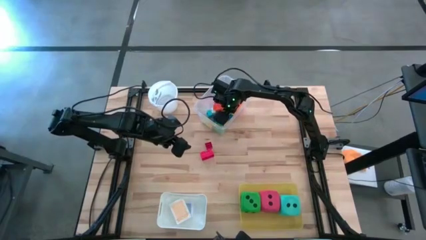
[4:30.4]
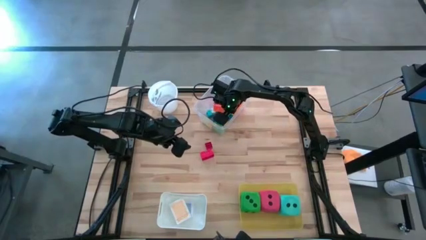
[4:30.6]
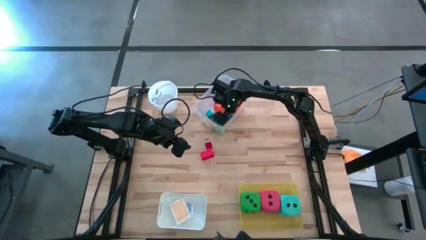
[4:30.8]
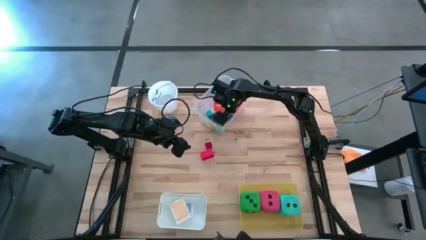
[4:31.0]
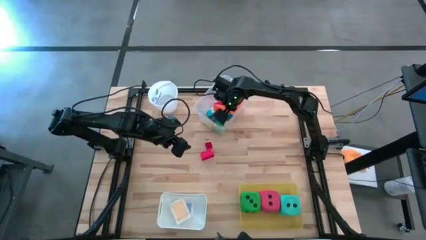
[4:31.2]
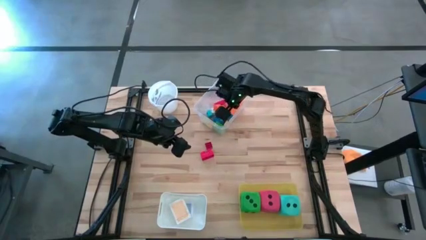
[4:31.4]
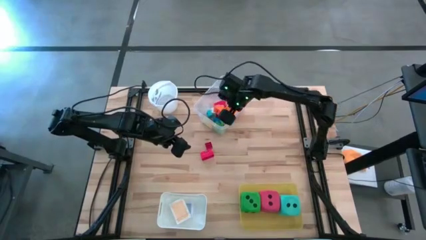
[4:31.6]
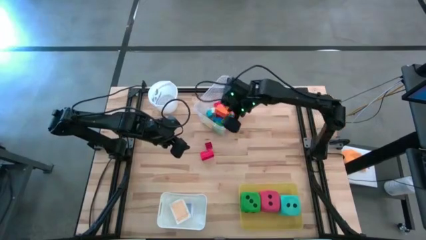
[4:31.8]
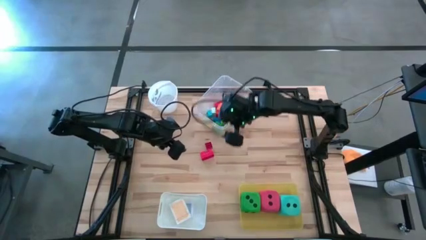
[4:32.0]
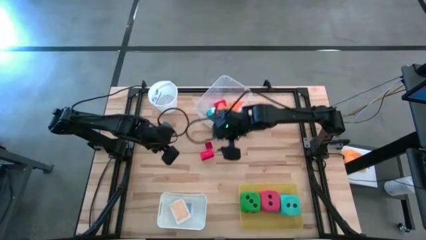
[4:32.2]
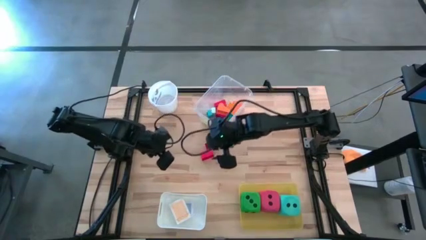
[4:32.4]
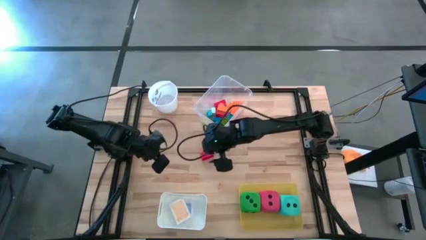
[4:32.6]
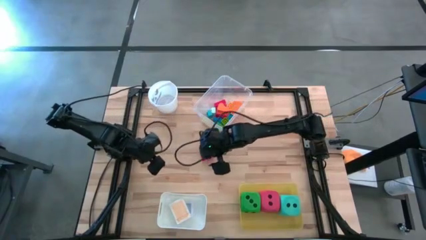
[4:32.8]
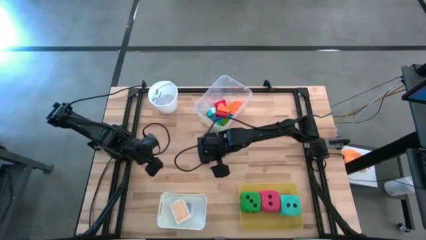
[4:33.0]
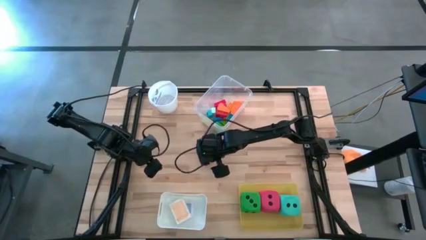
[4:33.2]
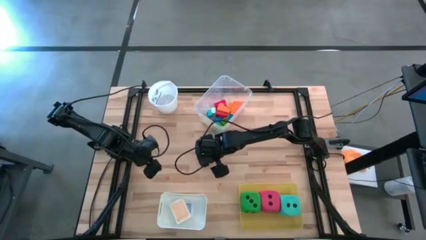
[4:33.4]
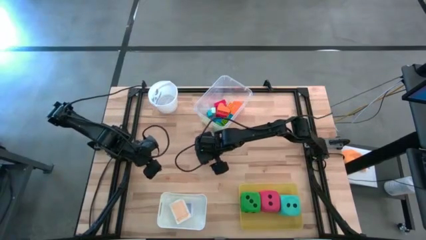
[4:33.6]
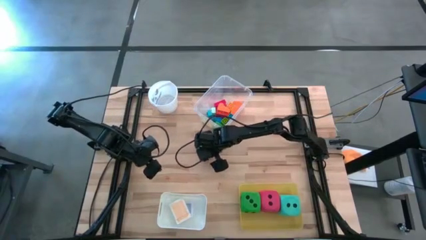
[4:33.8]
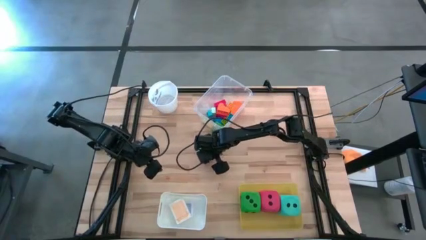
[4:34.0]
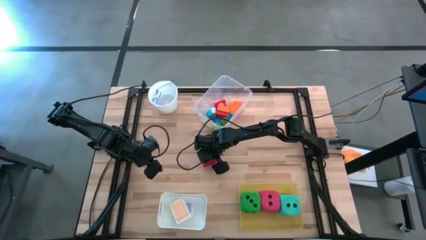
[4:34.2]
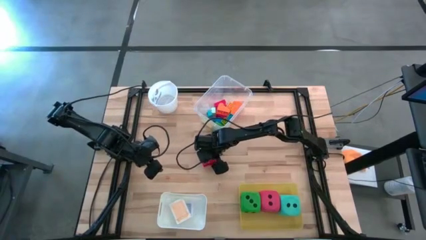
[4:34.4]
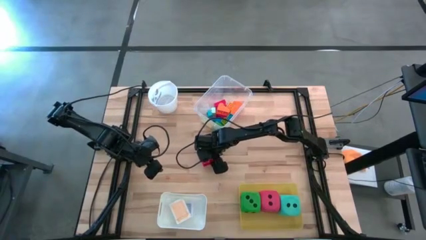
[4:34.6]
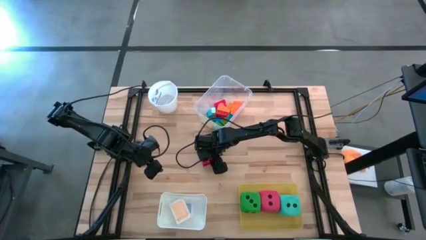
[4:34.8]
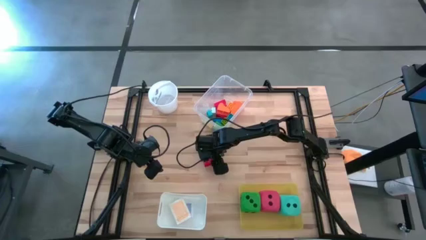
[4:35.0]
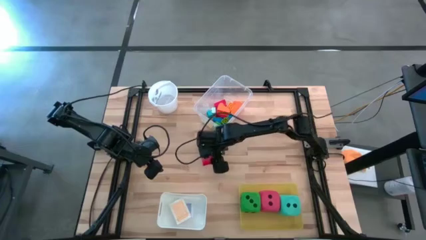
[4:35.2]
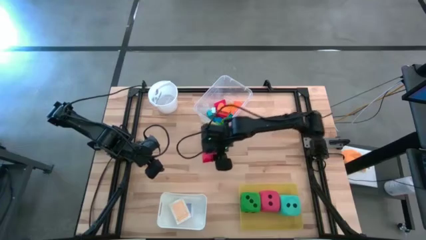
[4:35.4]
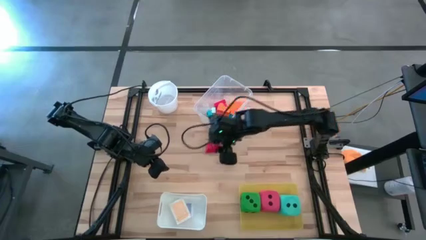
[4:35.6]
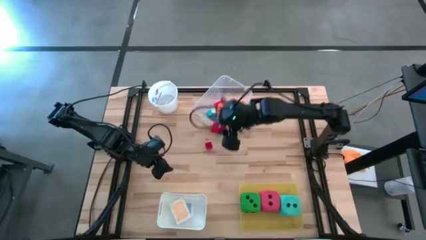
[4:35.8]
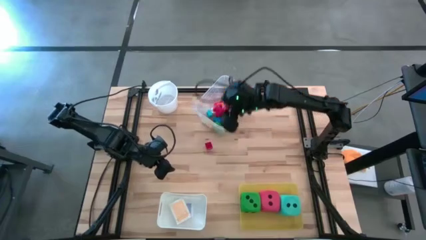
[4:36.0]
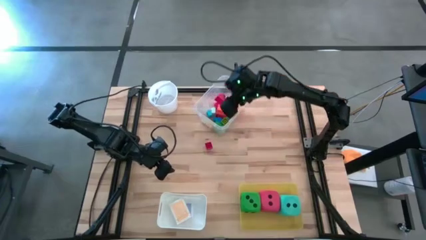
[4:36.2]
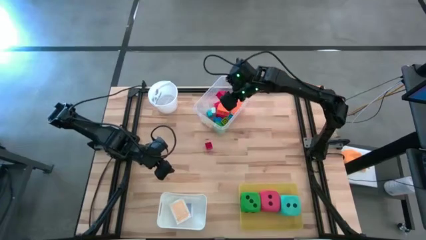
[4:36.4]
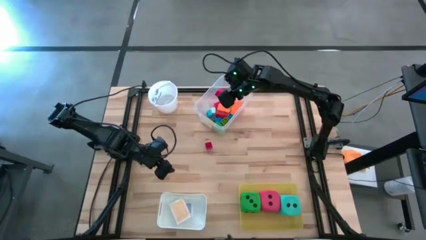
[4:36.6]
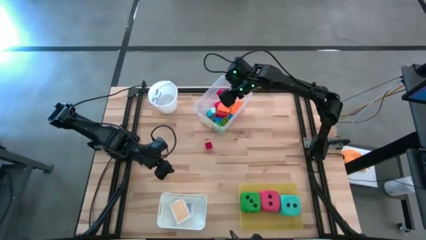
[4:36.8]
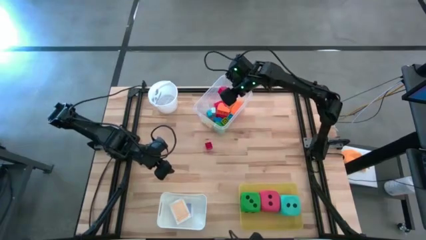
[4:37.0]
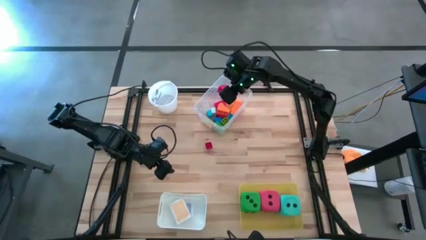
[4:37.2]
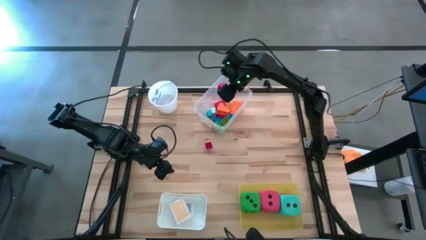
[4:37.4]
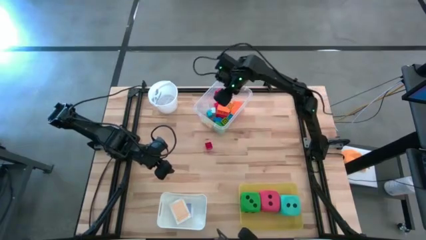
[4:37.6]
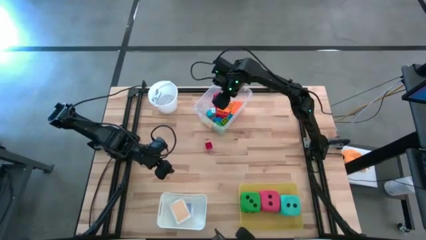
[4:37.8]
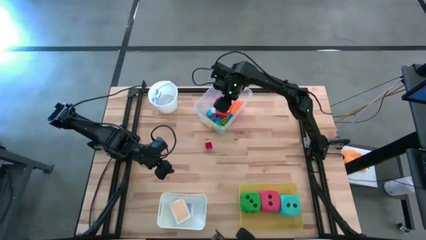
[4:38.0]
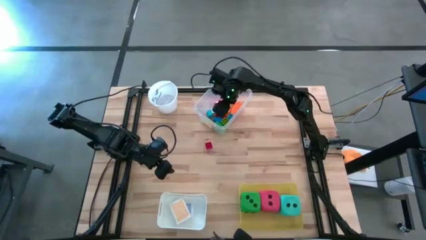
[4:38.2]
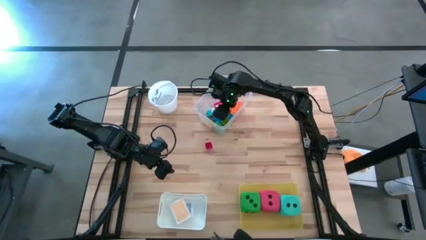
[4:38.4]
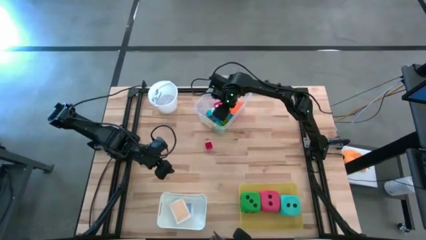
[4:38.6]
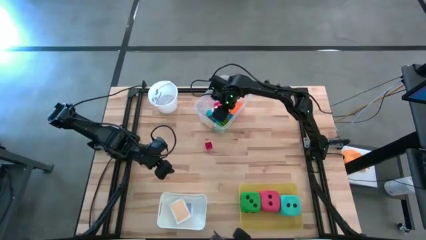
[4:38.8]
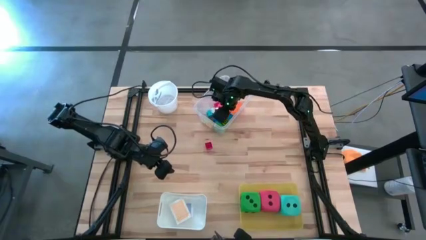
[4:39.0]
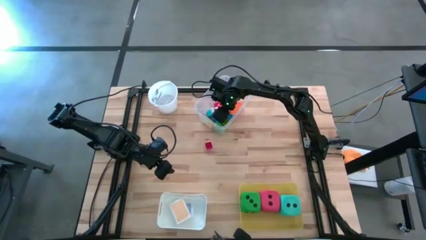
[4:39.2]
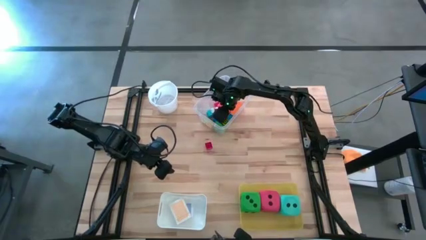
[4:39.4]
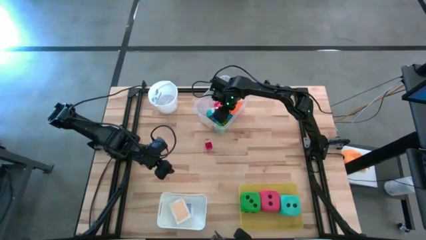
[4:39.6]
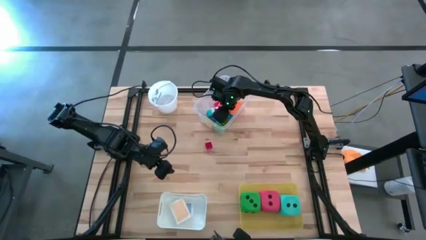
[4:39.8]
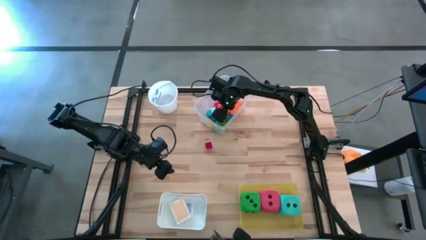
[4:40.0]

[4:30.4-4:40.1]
Task: Pick & Place Toys
Put the red game piece into the transparent bin

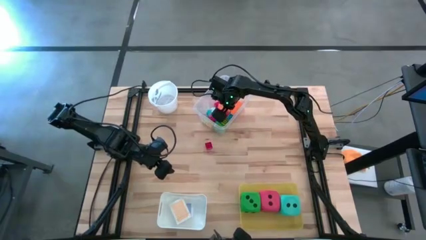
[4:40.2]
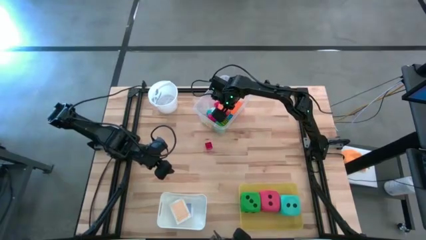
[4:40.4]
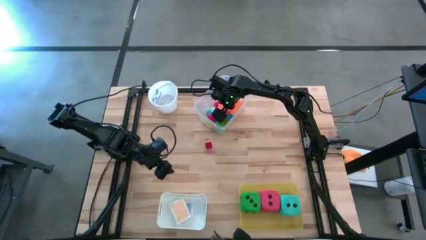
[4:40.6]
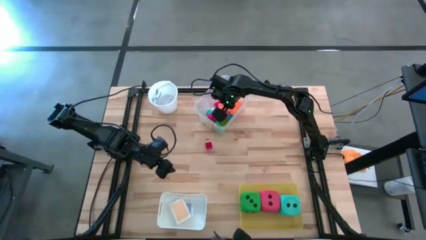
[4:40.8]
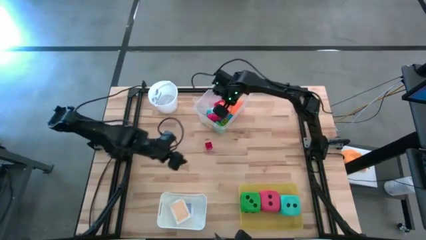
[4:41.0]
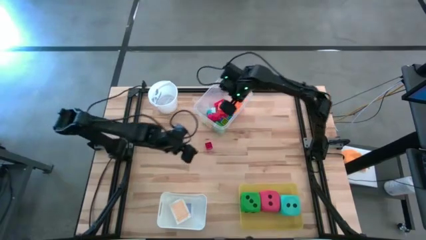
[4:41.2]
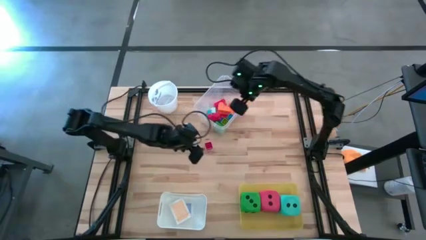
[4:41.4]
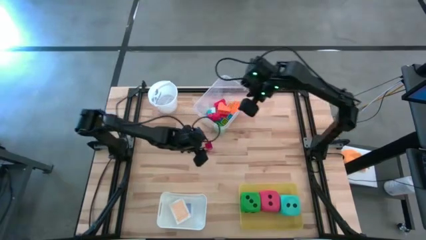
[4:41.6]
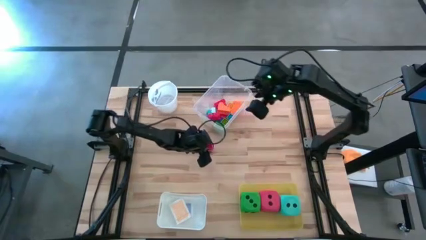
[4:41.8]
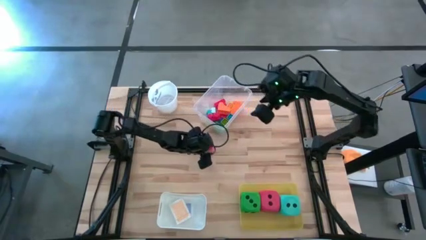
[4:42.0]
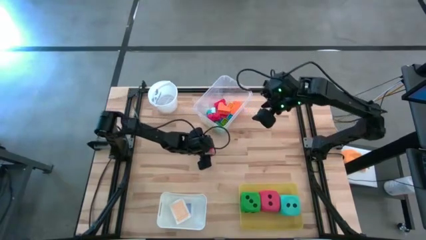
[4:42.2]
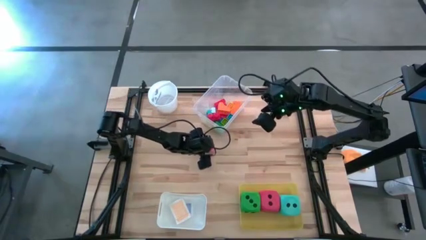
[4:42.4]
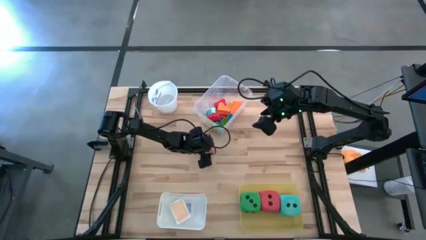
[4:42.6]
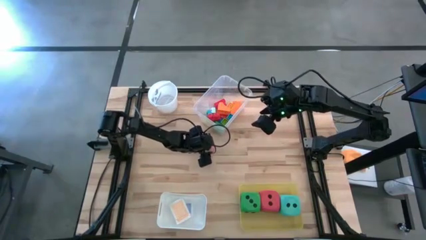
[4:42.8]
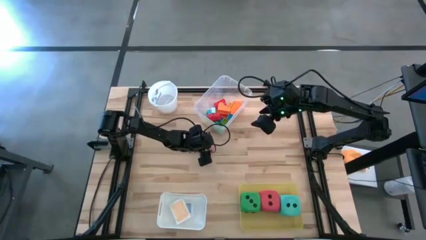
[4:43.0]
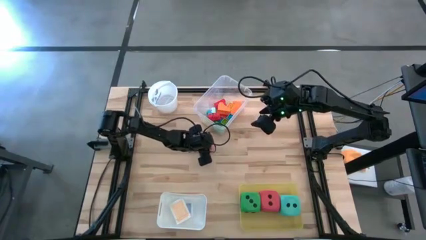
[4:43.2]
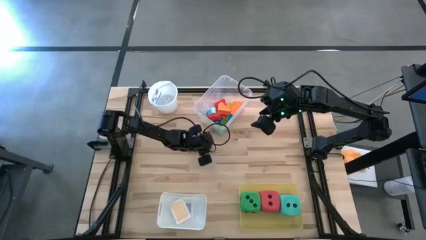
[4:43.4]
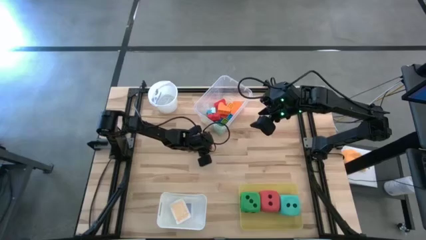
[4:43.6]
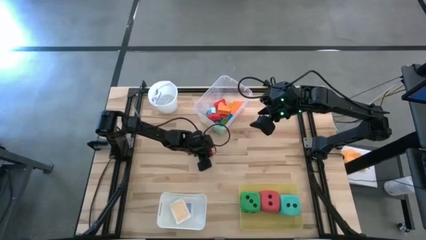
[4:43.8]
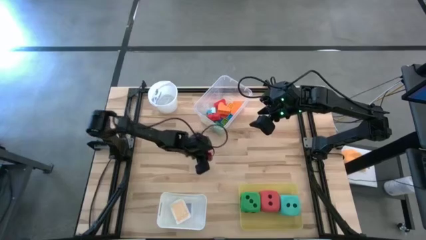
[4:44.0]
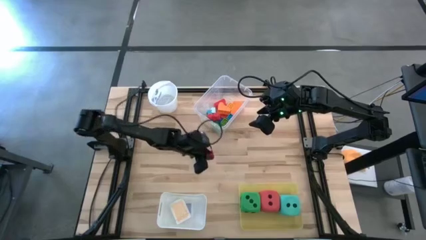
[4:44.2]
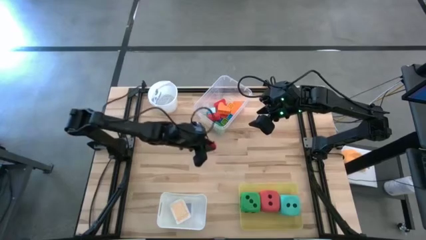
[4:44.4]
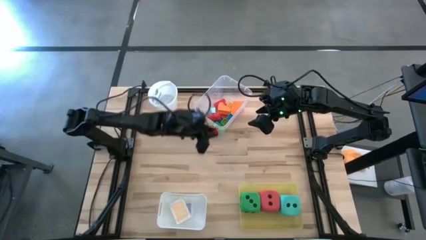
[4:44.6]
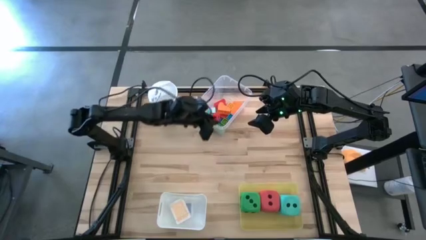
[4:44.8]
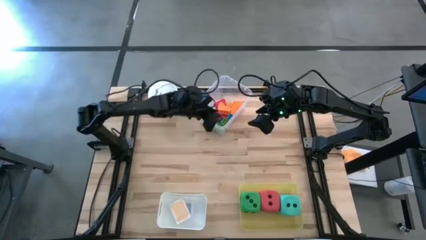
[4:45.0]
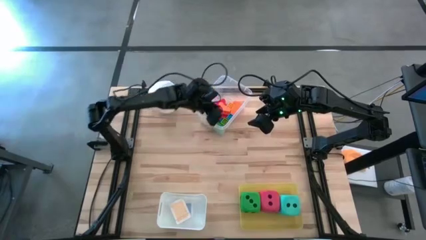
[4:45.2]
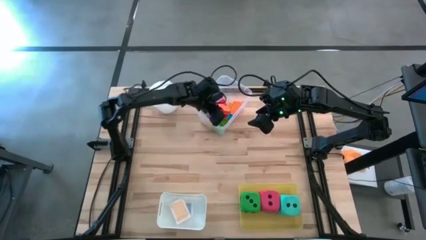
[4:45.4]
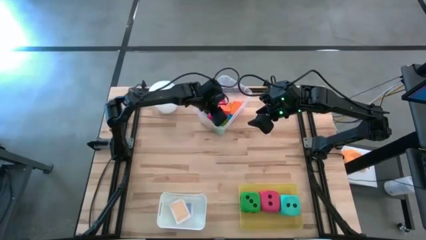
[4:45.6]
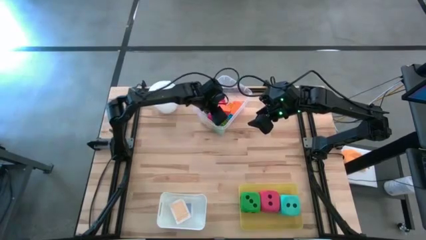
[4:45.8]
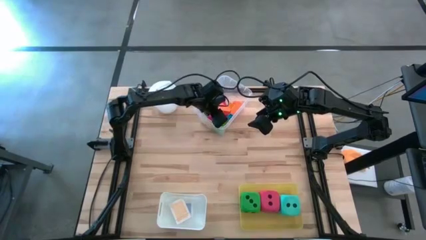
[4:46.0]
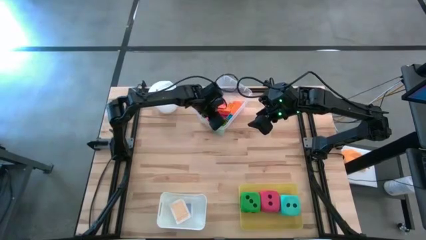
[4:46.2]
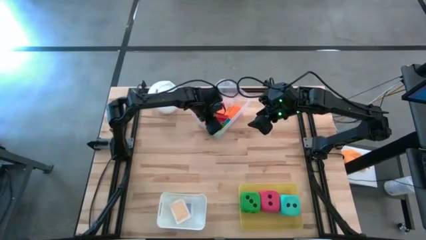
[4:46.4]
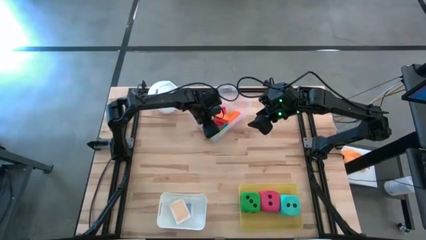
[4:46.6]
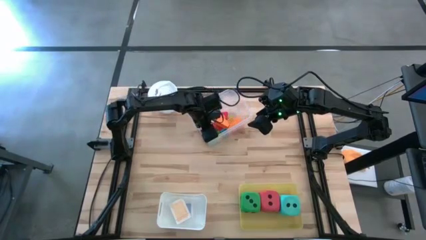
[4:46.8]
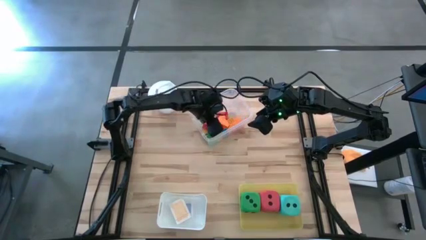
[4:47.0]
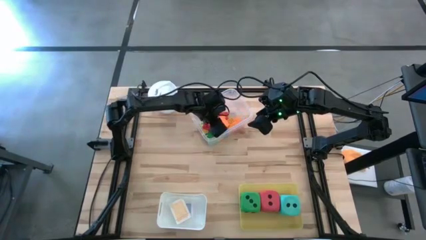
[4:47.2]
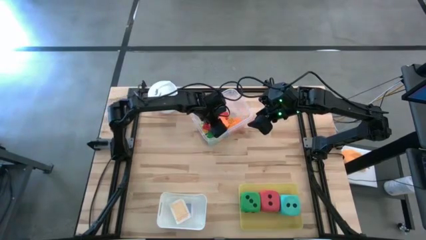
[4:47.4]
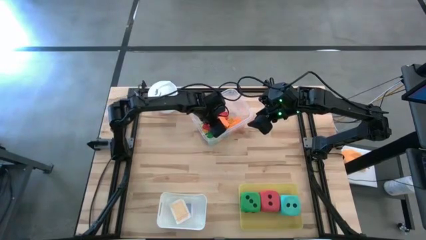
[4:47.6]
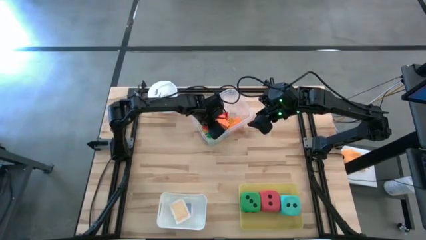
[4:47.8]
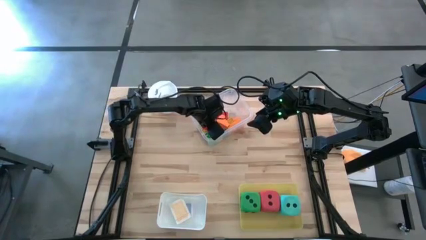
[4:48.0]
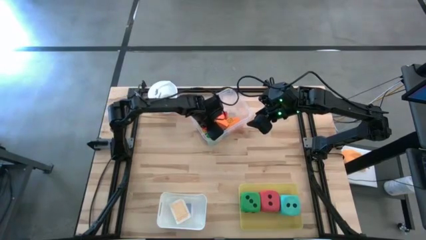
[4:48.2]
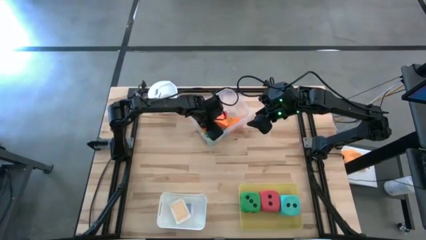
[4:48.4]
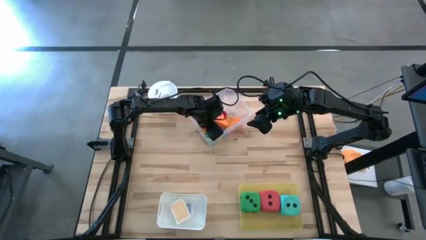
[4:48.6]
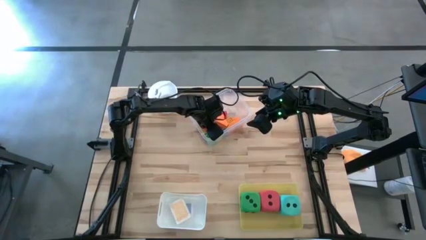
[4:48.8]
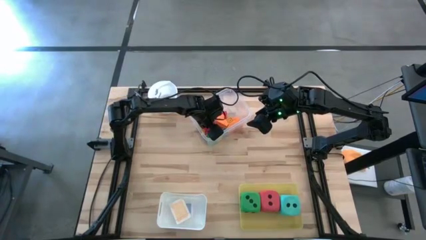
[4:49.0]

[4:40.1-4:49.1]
Put the red game piece into the transparent bin
